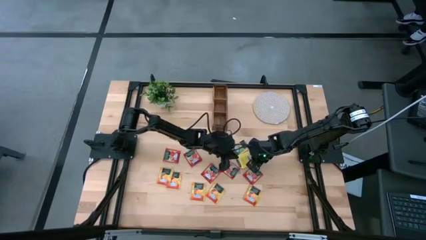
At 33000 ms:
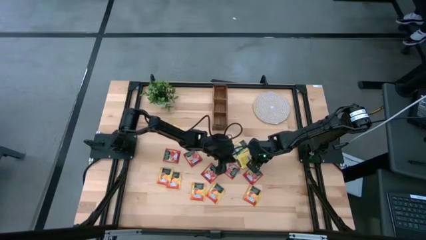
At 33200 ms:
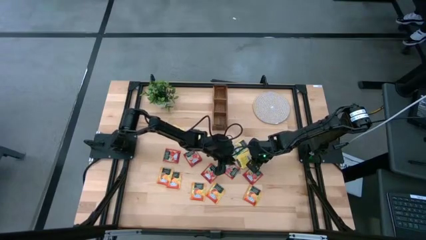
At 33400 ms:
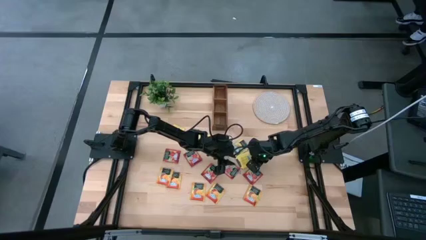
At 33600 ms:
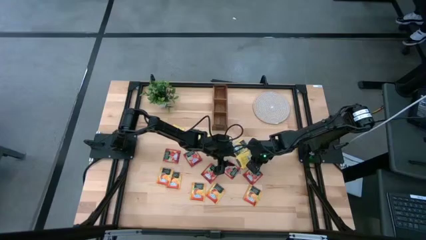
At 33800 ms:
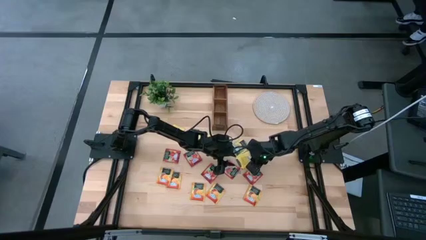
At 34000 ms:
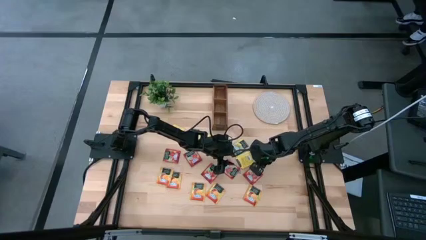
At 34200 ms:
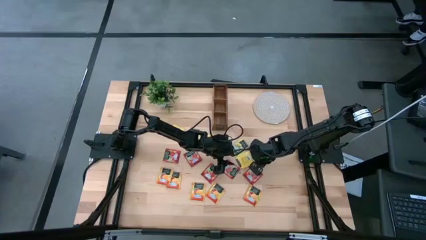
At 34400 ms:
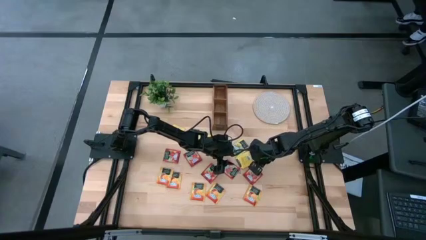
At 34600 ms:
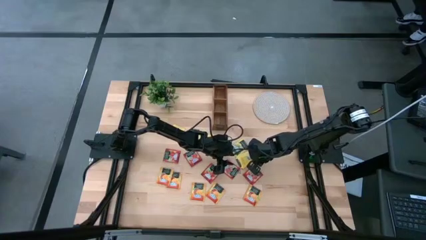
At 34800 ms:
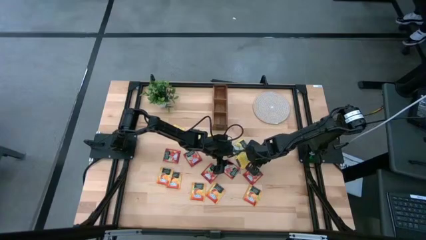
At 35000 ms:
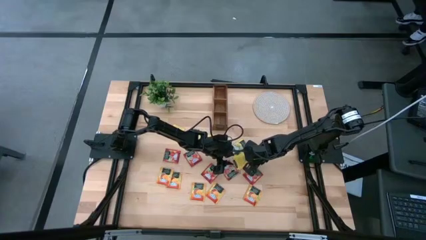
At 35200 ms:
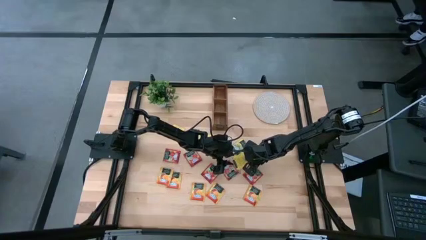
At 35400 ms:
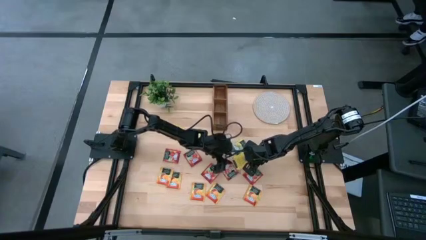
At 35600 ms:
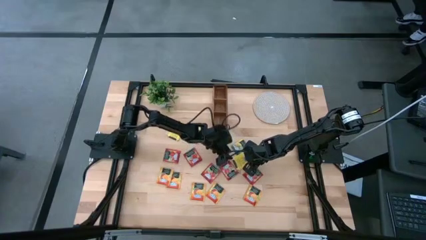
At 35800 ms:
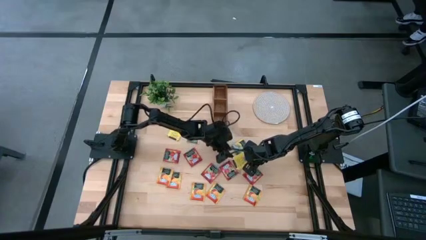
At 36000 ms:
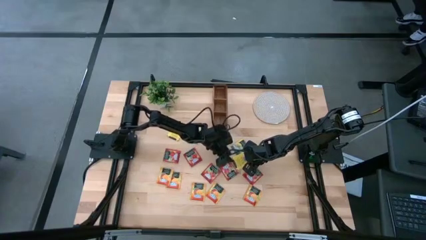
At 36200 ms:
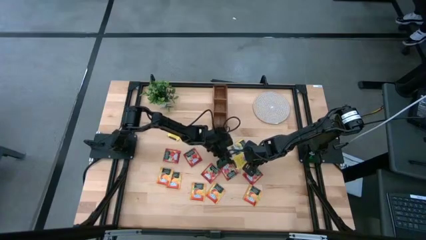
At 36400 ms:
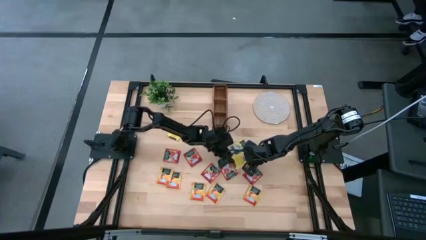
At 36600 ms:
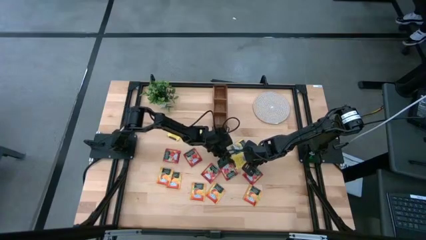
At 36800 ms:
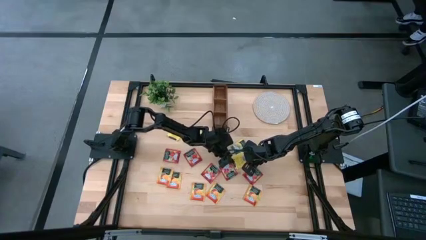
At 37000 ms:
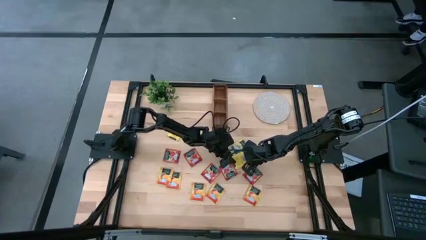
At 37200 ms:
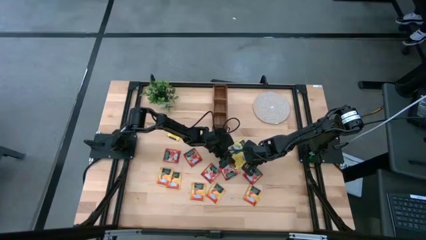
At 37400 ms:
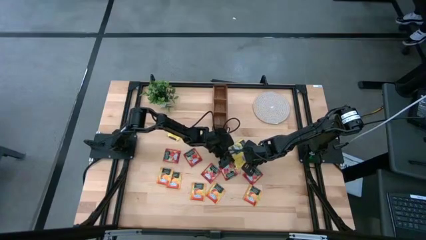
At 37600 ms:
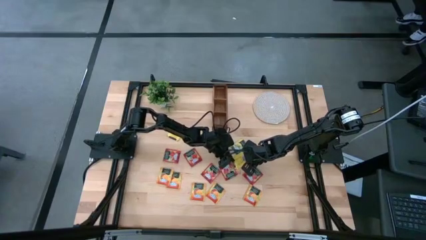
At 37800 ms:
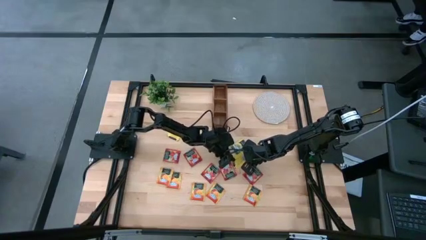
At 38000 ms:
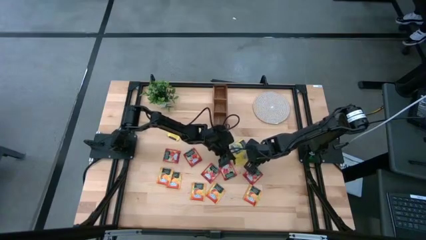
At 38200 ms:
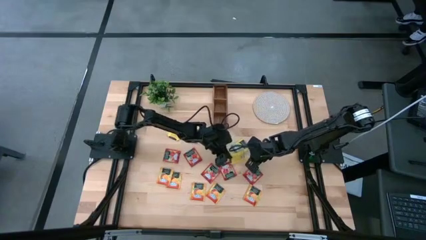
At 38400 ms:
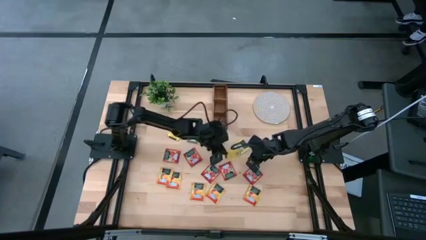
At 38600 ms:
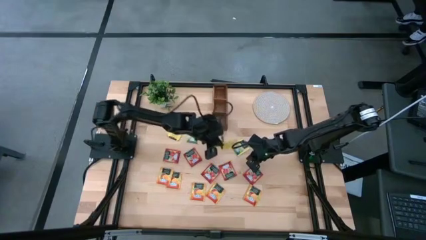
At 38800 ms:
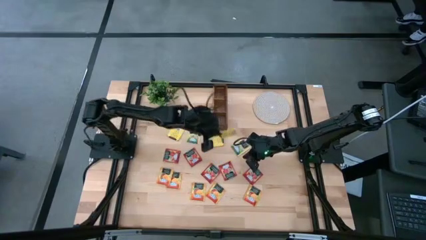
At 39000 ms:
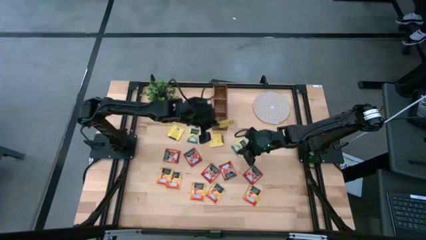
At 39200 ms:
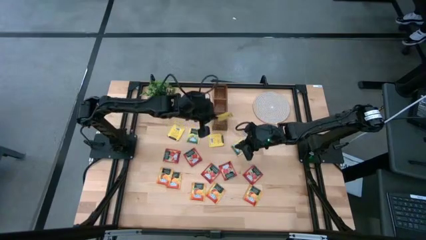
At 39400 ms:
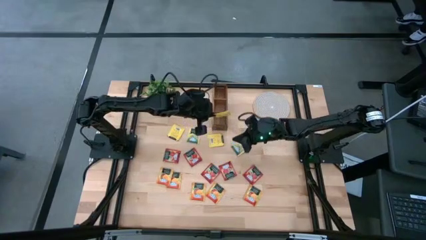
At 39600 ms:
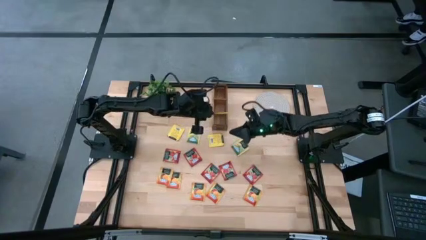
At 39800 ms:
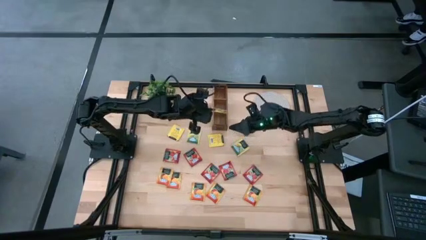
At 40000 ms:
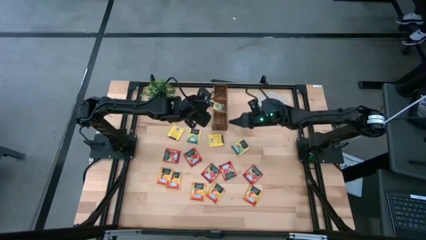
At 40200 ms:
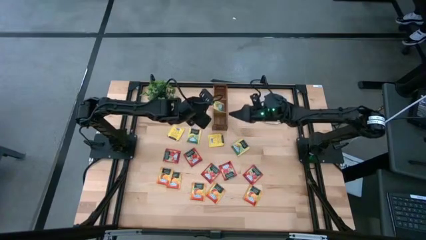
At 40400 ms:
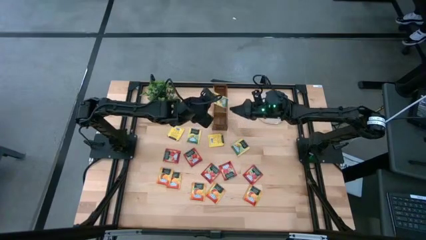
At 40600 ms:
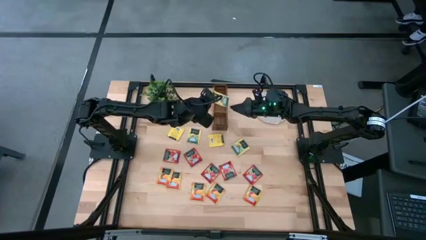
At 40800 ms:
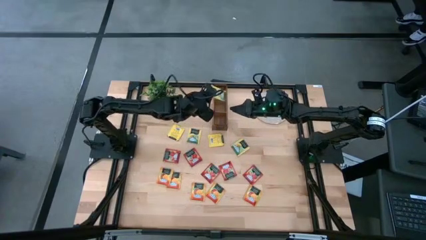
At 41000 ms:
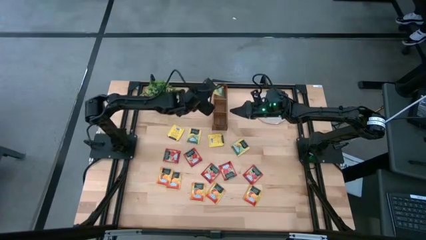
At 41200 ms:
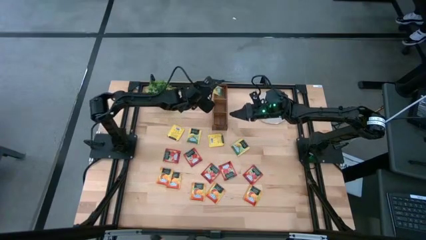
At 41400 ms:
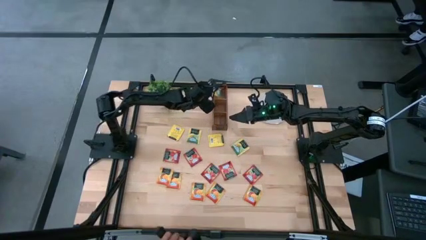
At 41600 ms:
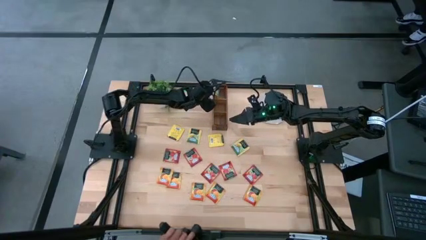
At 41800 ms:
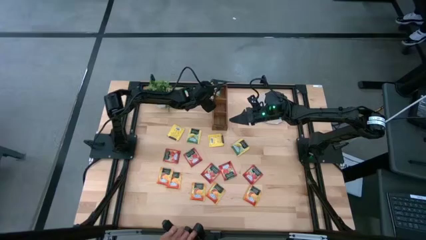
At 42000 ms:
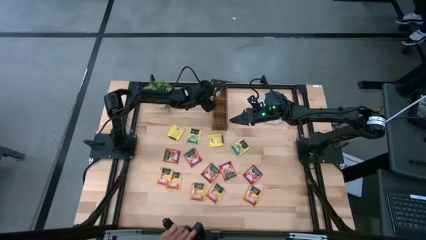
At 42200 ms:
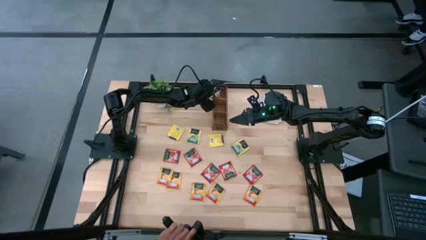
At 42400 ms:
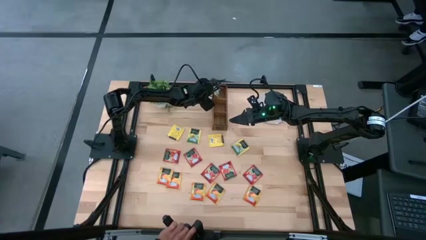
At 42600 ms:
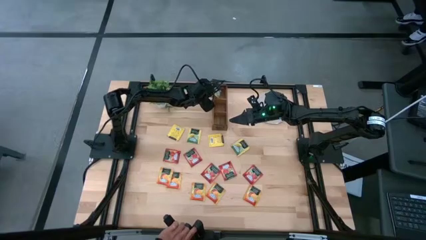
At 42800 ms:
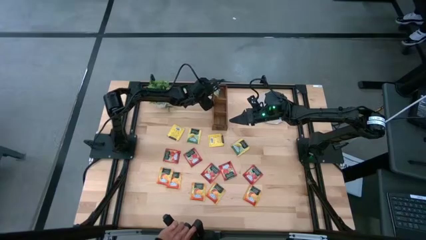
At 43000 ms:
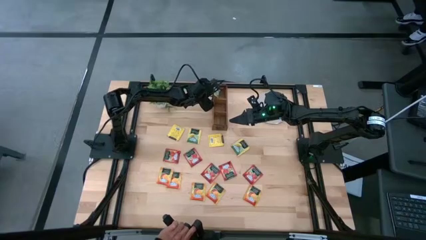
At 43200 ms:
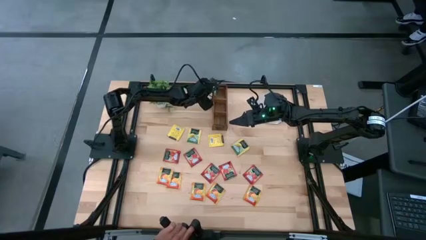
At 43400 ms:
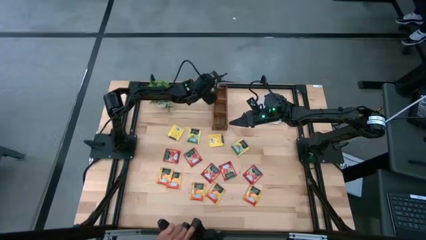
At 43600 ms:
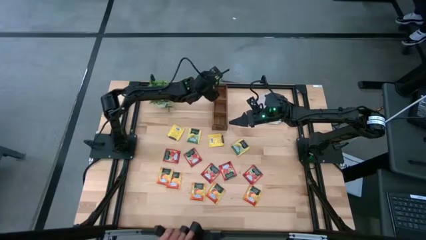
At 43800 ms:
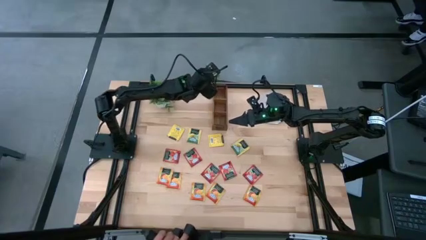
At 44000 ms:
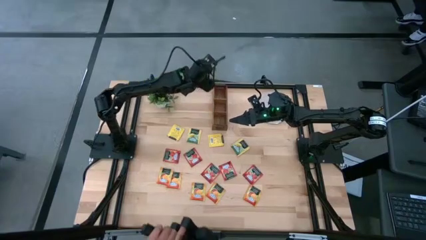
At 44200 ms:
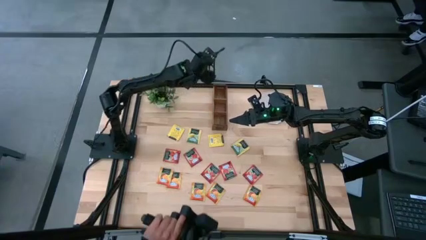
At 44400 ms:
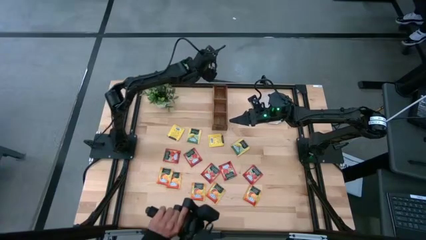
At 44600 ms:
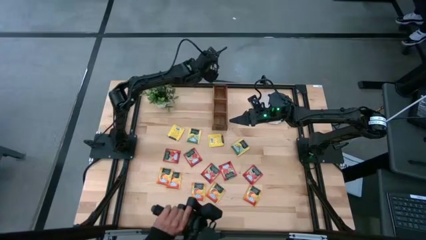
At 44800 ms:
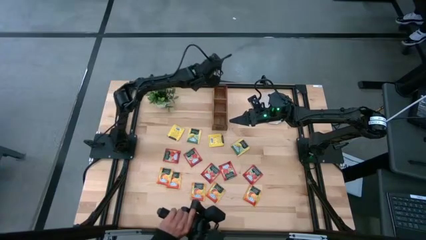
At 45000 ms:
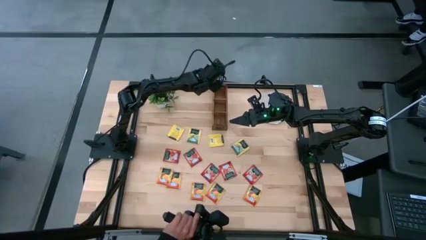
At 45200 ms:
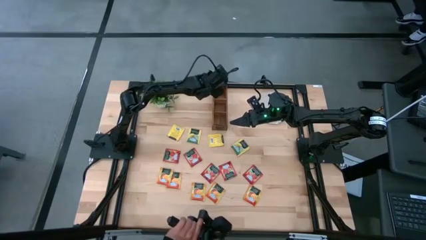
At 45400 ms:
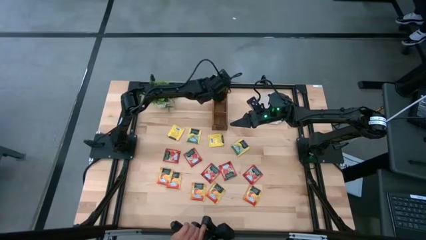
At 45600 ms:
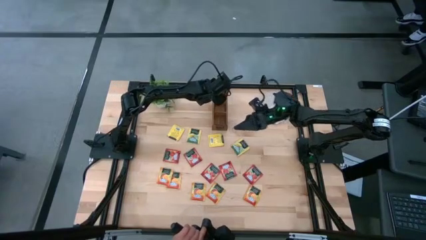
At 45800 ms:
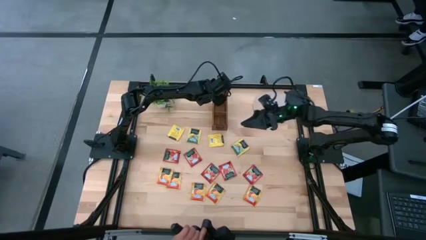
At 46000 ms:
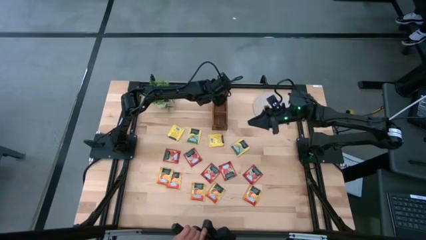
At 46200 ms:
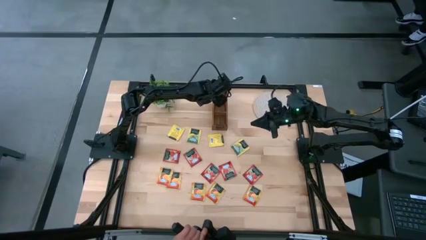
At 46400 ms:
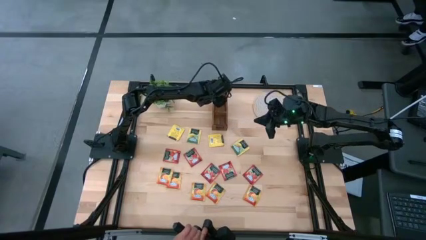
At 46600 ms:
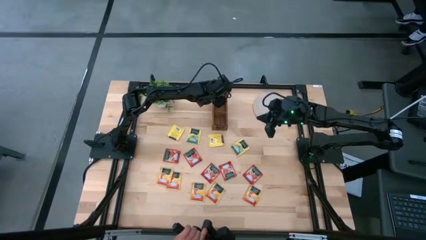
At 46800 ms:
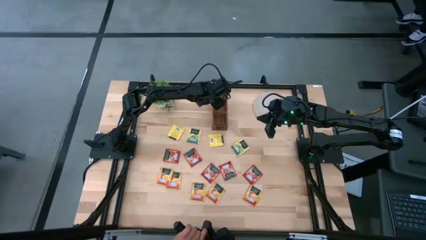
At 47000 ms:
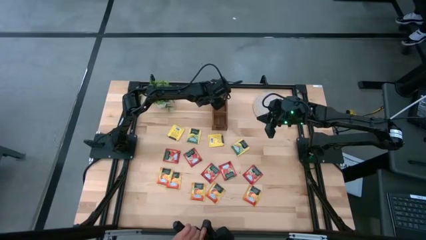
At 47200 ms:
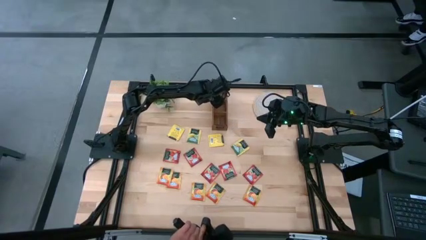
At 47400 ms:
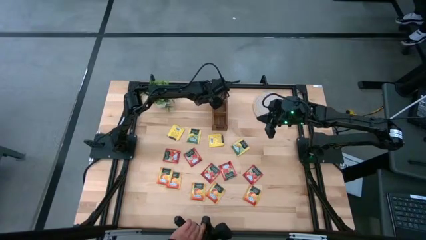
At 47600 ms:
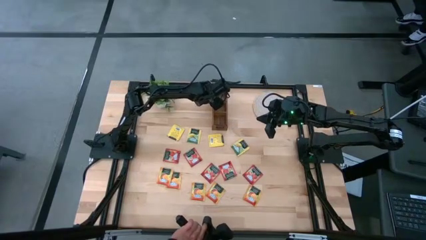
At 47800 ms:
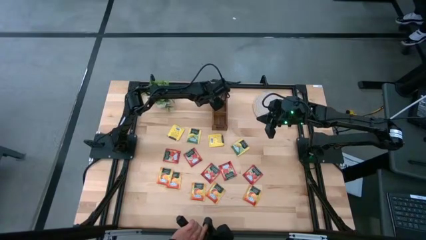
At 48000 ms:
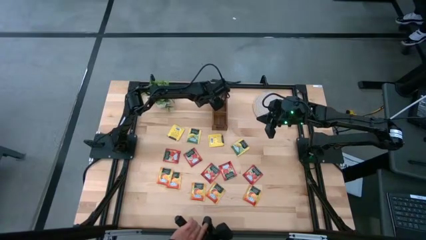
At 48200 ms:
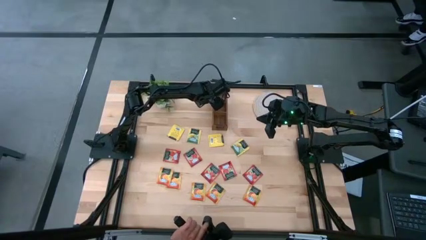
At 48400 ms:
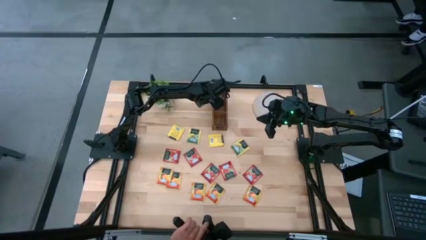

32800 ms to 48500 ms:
Task: Pick & Place Tea
Put the yellow tea bag into the left section of the wooden organizer

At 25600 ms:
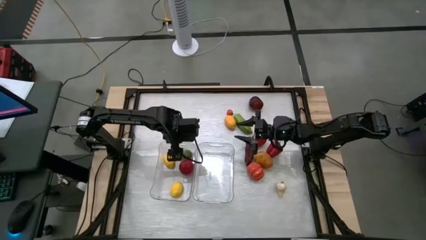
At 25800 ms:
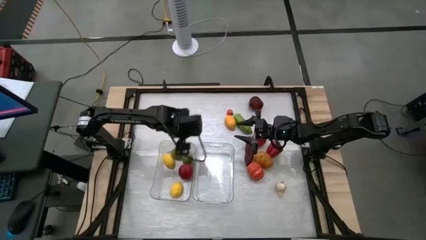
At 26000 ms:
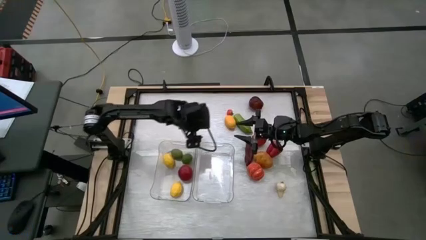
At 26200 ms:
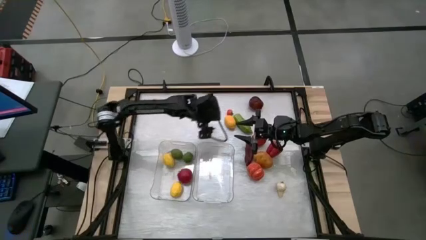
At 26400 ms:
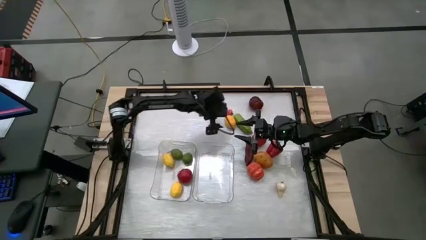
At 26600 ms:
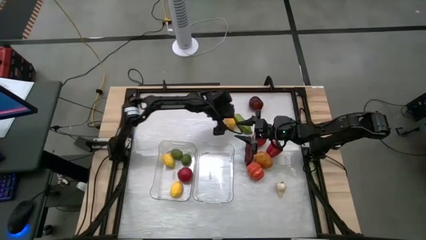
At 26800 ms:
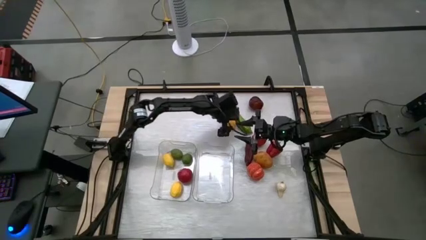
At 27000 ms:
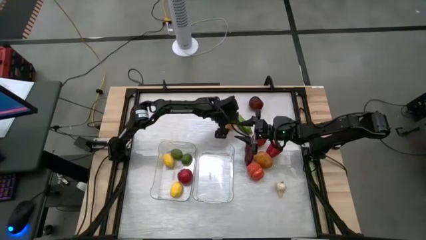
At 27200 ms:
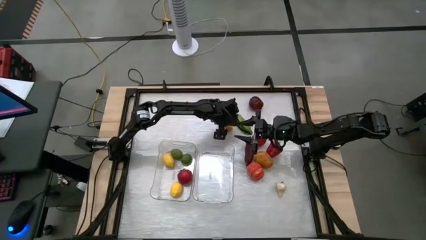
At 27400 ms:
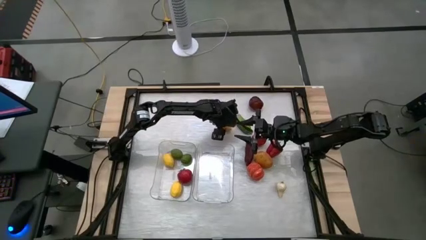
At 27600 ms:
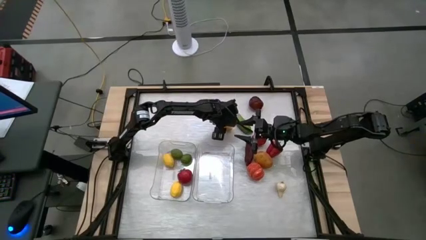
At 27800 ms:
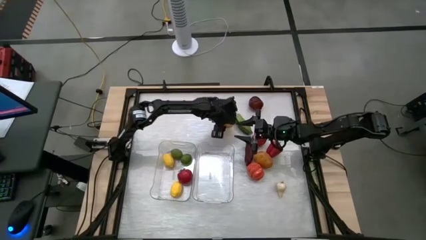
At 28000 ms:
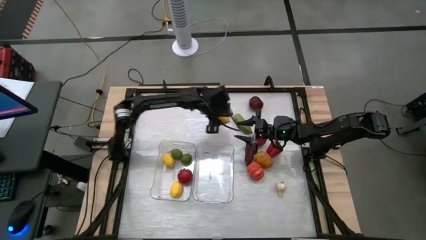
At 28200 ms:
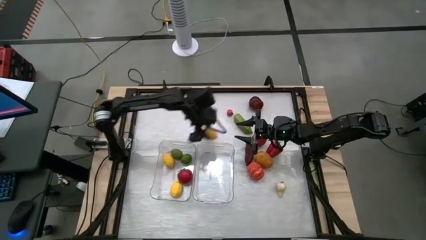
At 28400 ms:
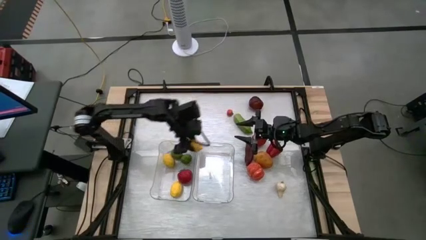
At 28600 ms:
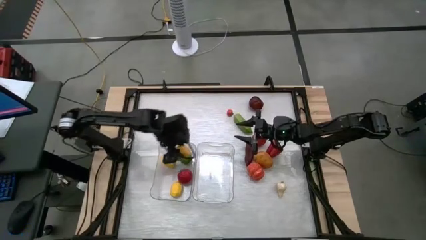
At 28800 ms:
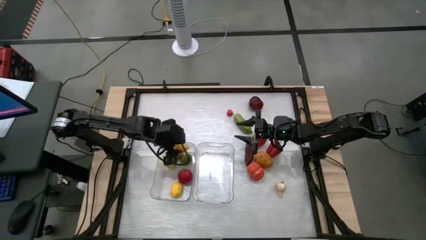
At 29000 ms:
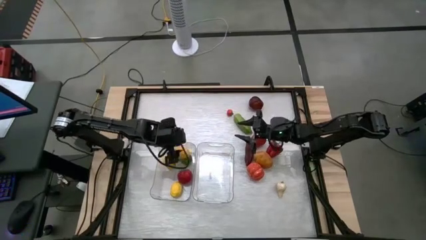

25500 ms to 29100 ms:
Task: Sort produce into baskets
Put the lemon into the left transparent bin
